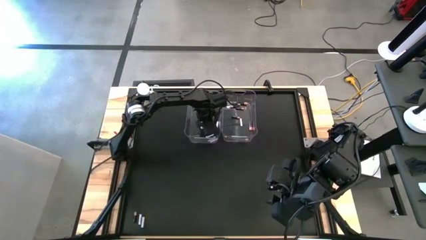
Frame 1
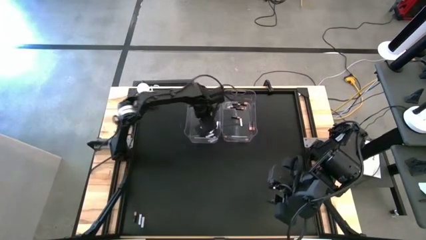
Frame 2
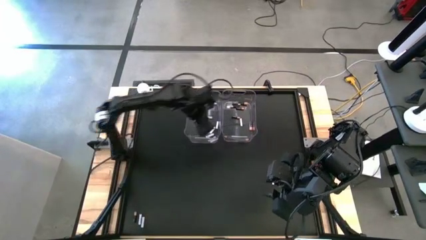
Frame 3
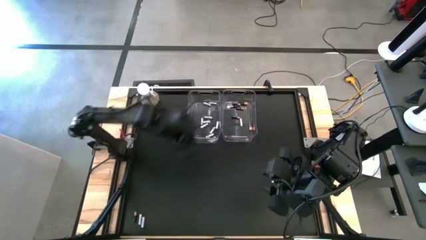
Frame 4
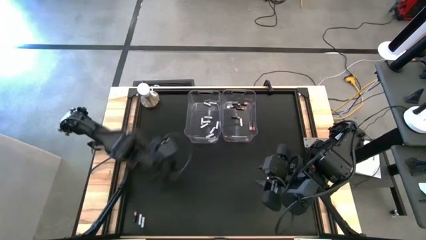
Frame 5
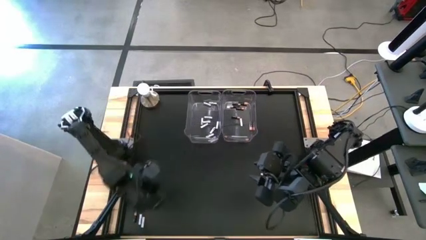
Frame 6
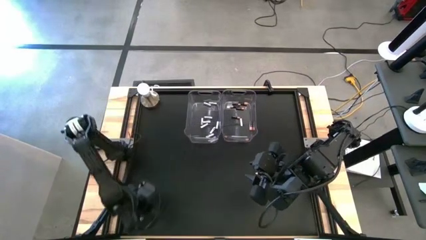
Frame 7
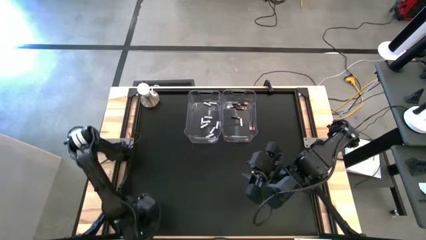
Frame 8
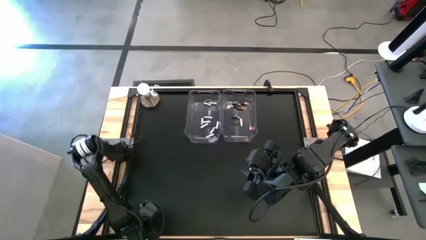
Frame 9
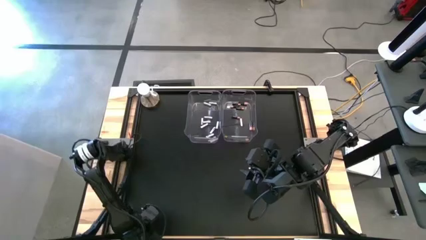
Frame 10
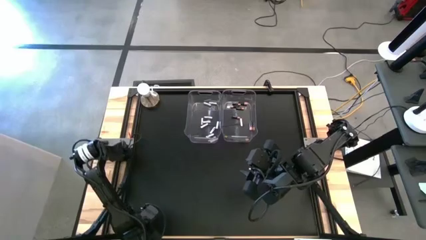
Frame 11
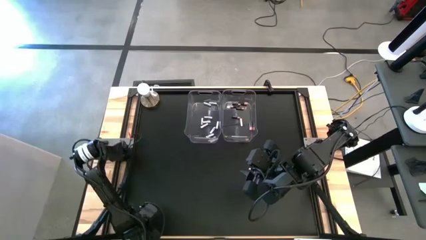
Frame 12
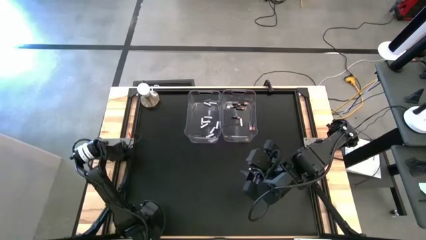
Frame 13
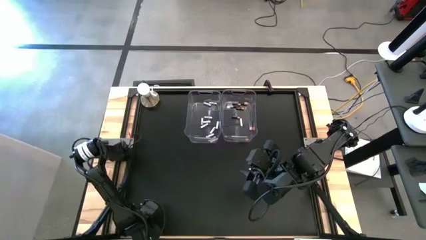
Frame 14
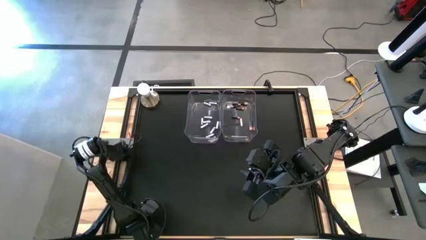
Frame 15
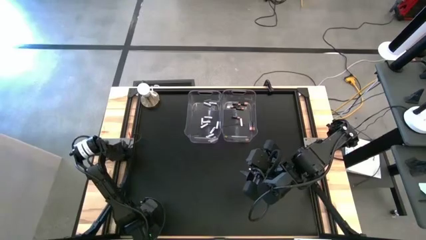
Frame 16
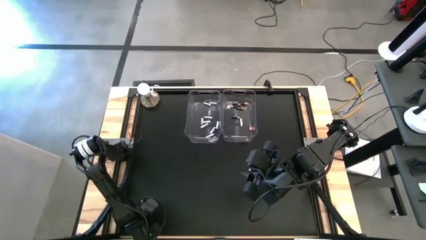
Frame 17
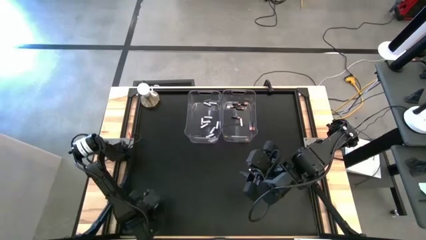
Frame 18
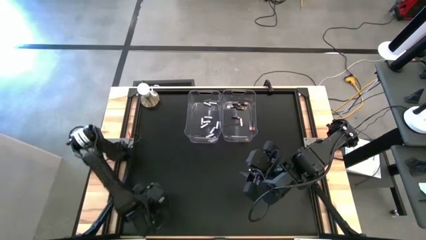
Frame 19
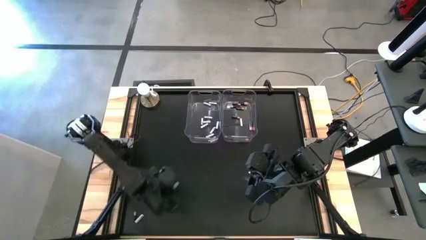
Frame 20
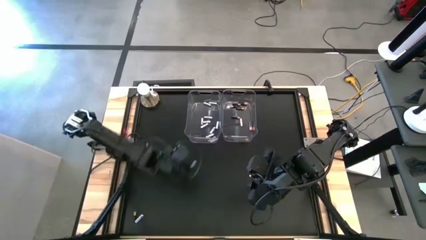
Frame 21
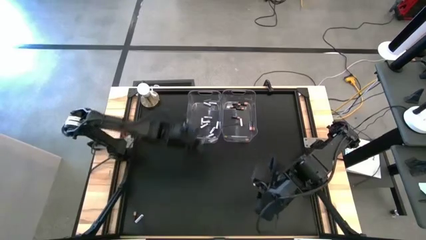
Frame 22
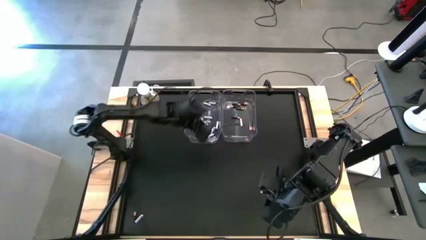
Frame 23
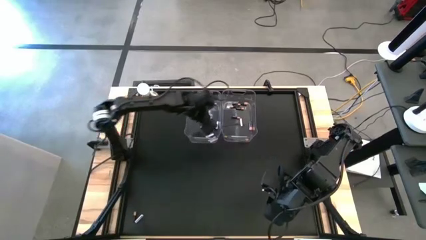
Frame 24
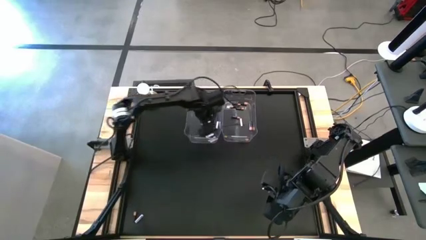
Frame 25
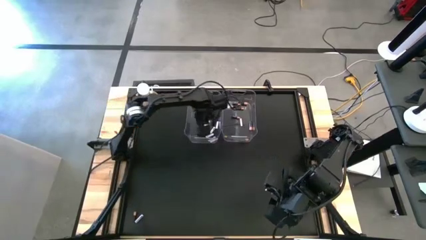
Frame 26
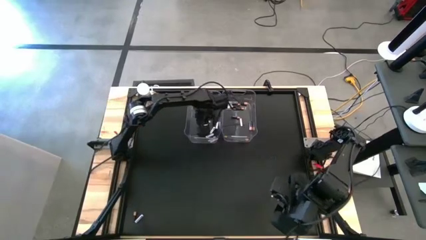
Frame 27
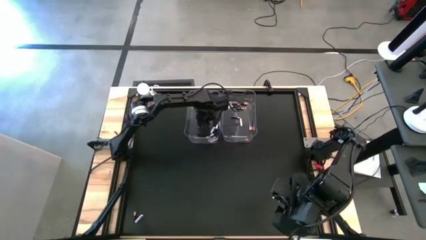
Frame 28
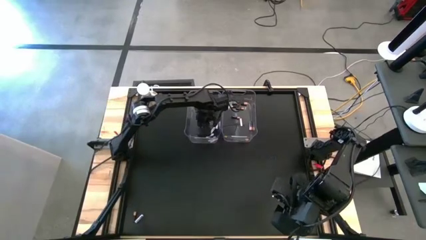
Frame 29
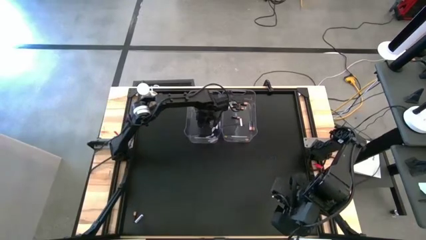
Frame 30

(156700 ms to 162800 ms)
Task: Sort batteries
Put the white battery into the left transparent bin

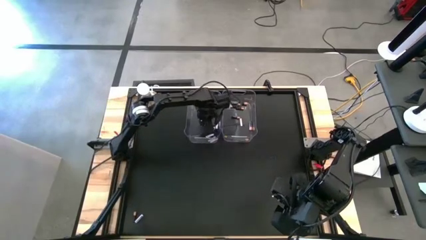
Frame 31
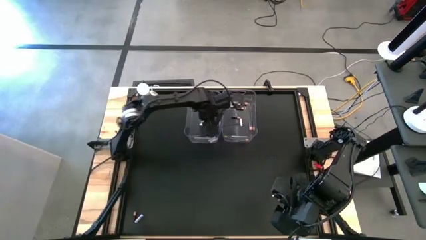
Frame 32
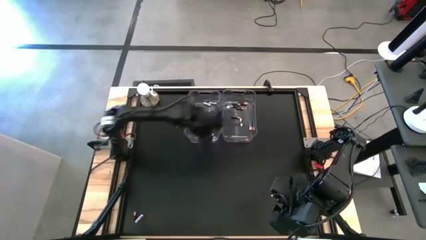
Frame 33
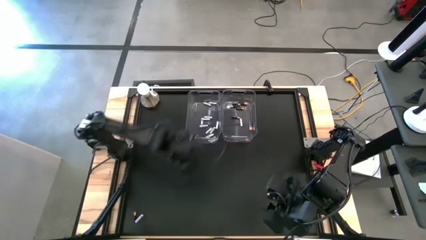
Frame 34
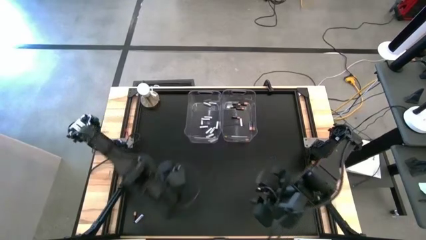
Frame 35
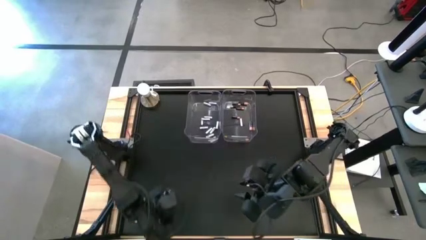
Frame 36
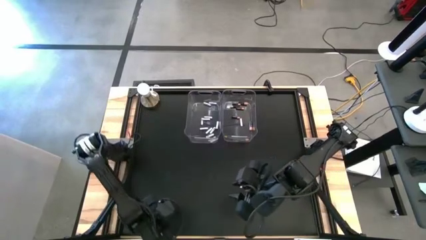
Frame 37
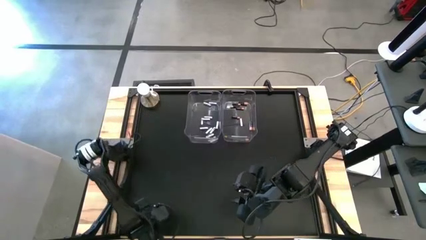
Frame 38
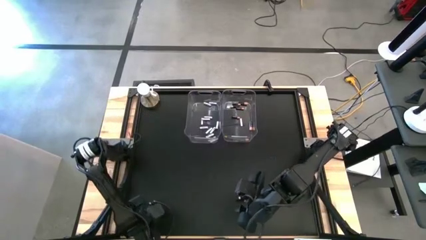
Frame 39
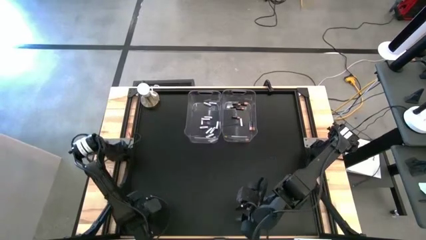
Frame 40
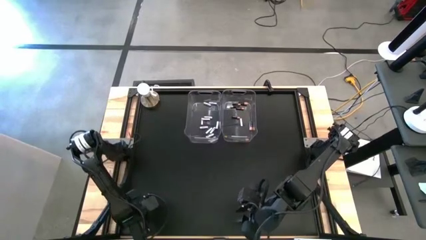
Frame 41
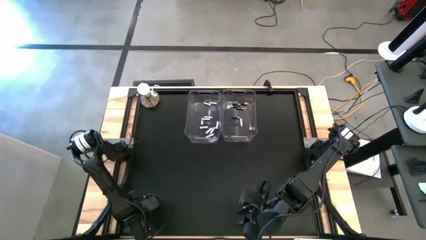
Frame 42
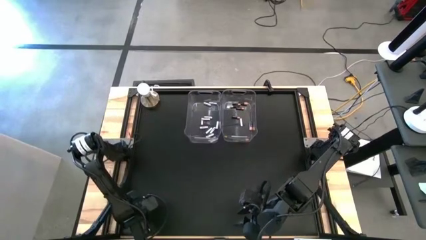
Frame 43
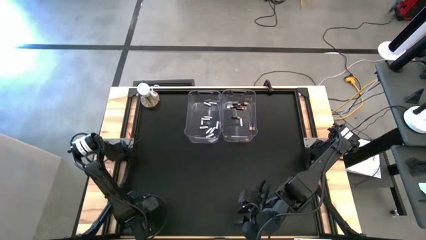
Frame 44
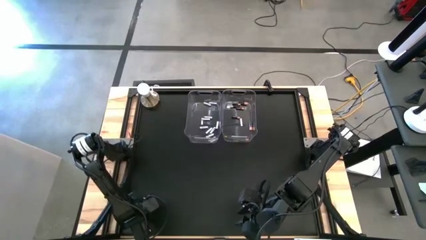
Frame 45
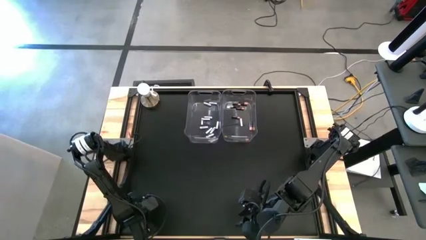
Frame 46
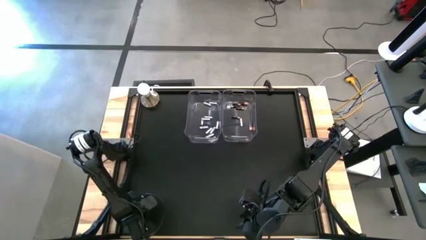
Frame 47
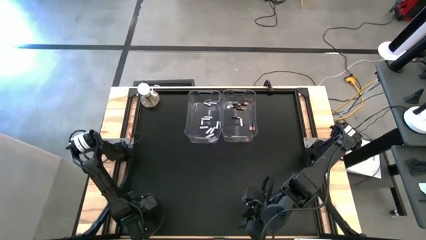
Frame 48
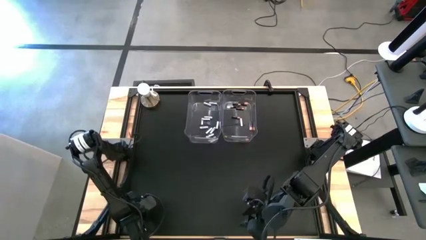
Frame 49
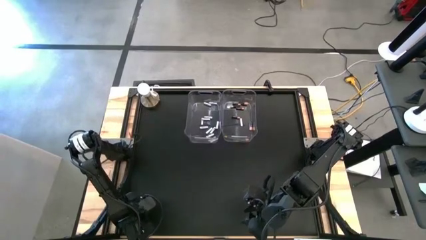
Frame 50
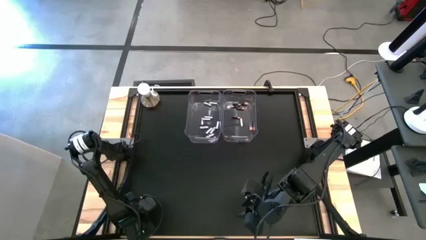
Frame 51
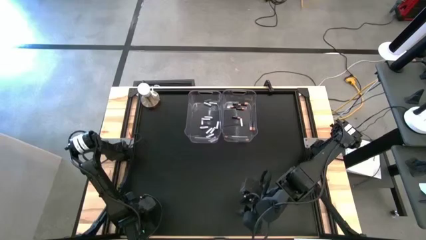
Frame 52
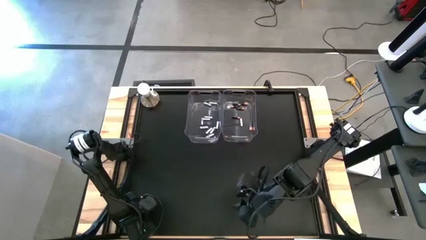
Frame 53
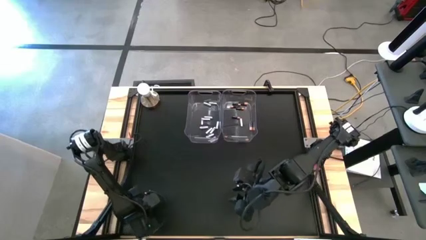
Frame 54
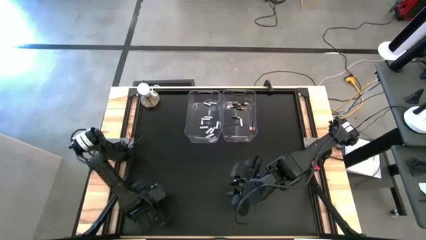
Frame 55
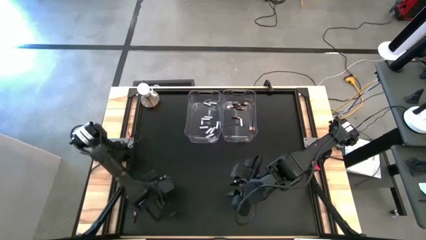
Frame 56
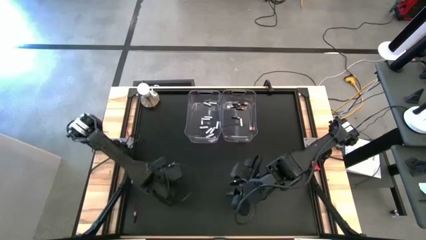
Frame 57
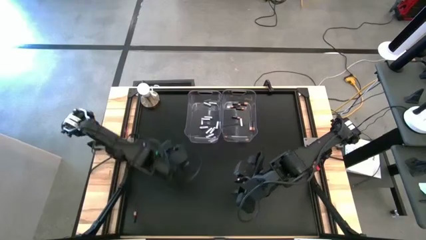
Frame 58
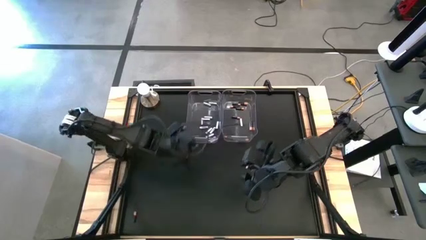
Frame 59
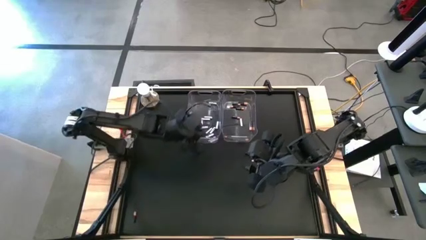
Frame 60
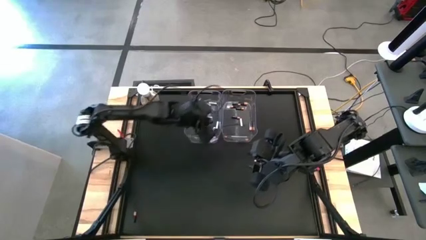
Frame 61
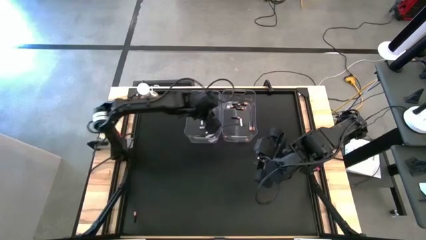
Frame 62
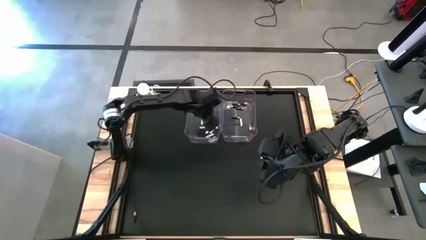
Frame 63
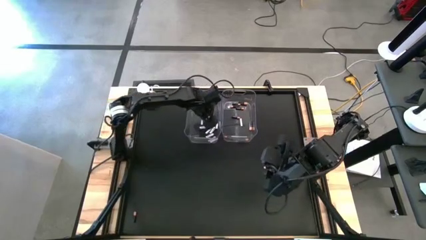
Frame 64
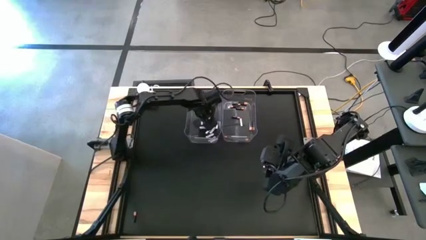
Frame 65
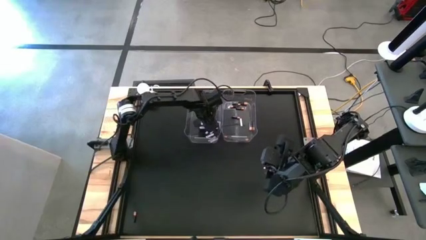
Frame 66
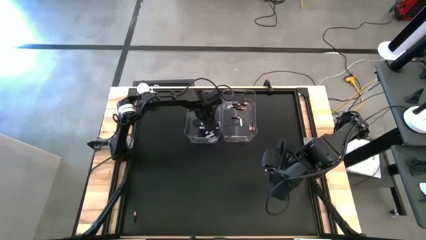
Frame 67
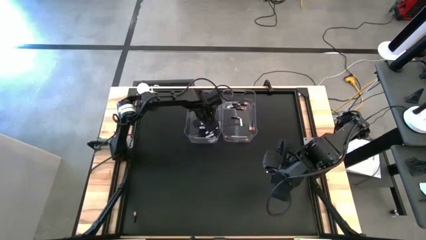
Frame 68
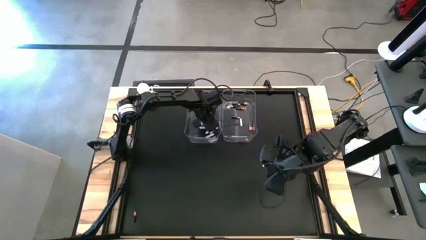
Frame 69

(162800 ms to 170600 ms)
Put the white battery into the left transparent bin
